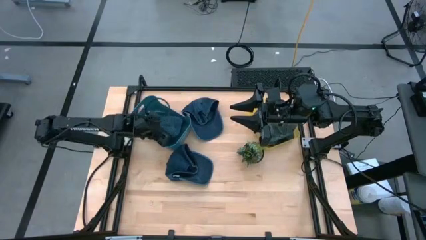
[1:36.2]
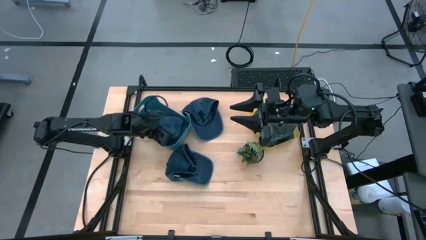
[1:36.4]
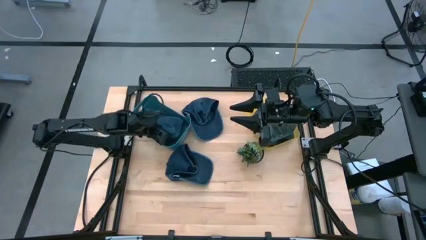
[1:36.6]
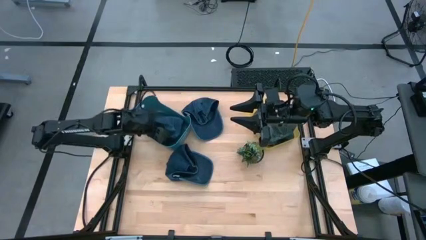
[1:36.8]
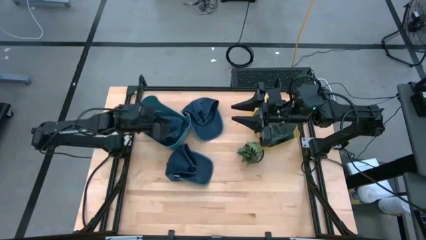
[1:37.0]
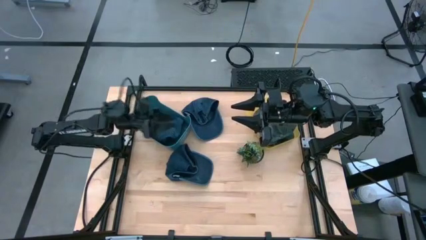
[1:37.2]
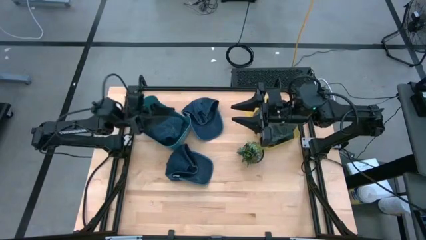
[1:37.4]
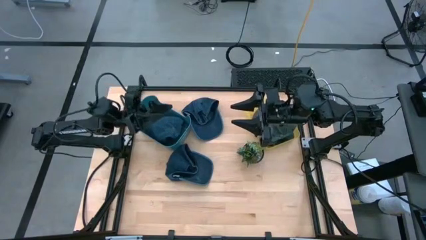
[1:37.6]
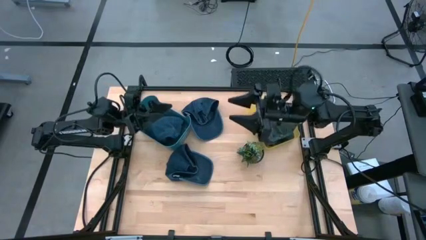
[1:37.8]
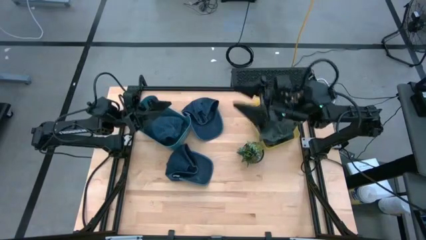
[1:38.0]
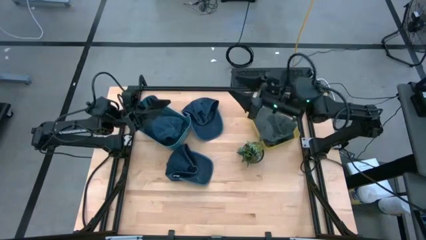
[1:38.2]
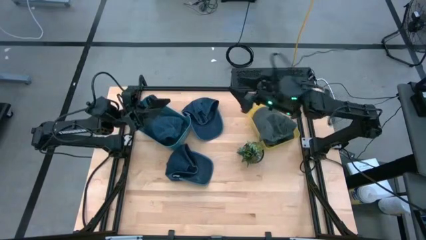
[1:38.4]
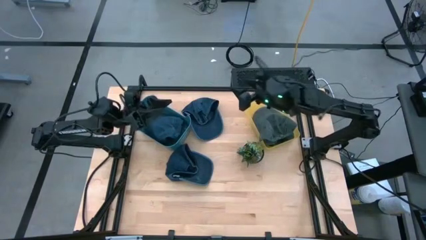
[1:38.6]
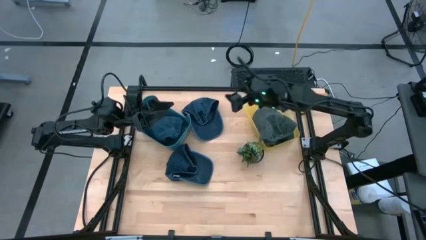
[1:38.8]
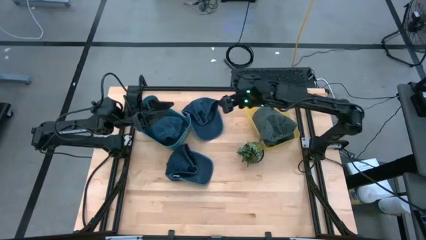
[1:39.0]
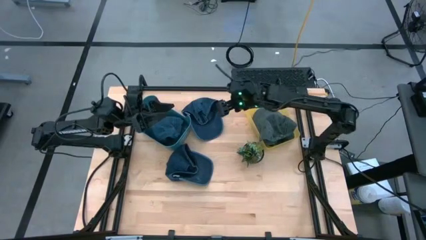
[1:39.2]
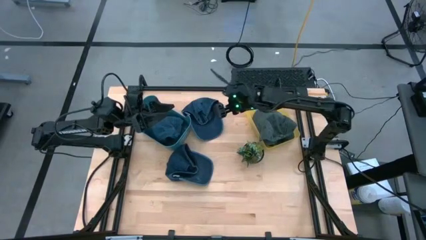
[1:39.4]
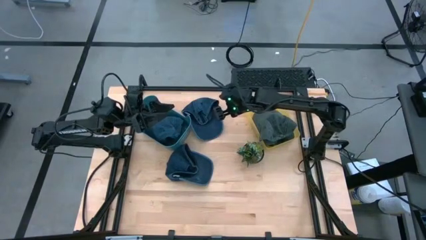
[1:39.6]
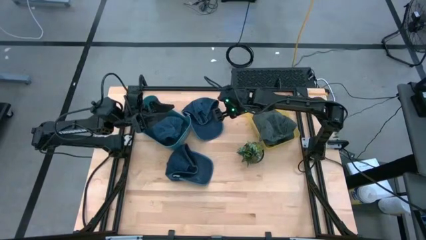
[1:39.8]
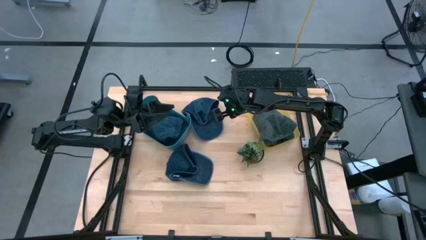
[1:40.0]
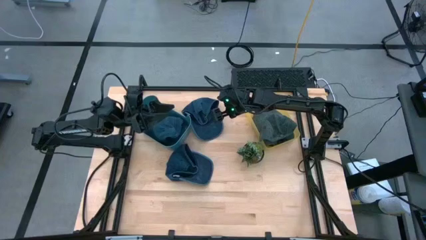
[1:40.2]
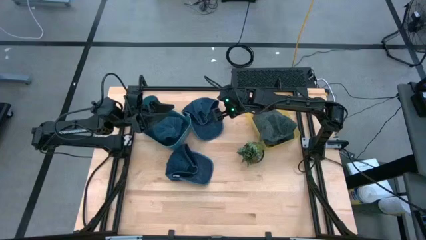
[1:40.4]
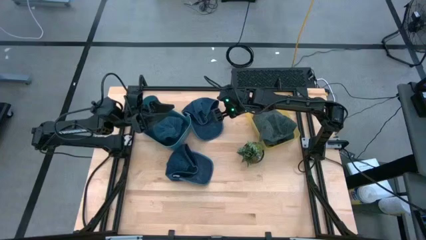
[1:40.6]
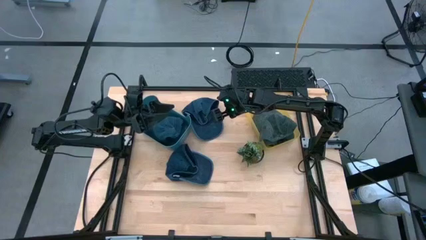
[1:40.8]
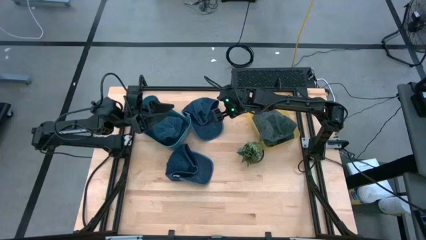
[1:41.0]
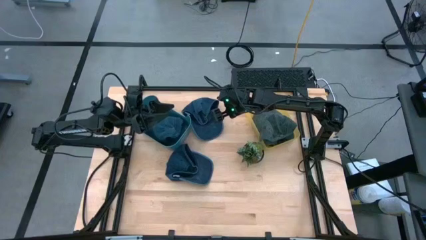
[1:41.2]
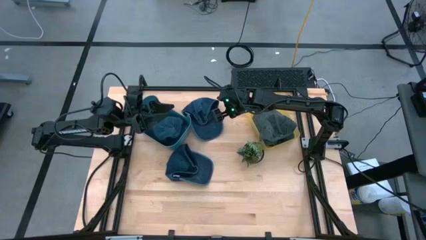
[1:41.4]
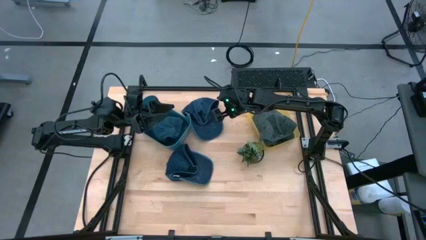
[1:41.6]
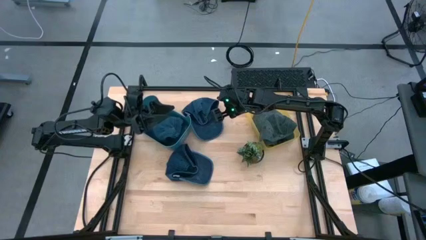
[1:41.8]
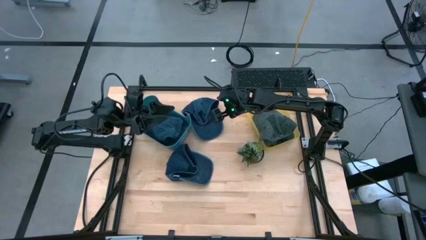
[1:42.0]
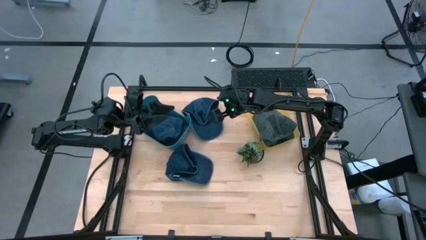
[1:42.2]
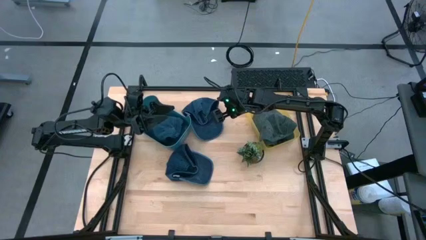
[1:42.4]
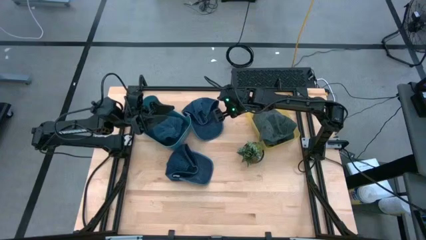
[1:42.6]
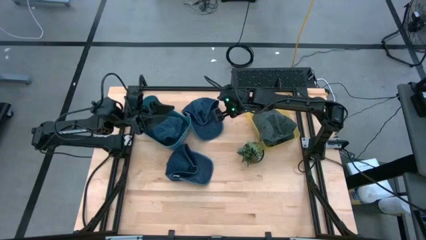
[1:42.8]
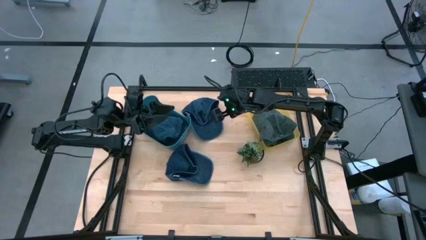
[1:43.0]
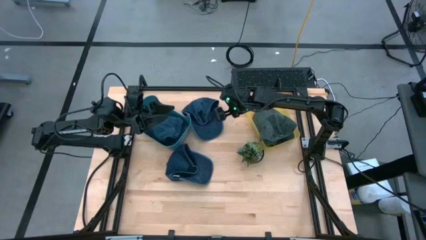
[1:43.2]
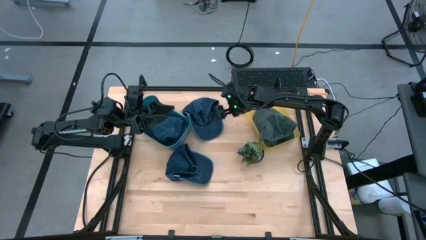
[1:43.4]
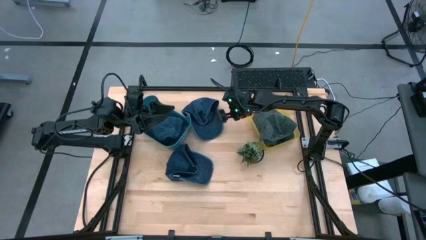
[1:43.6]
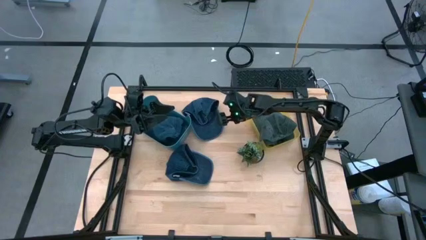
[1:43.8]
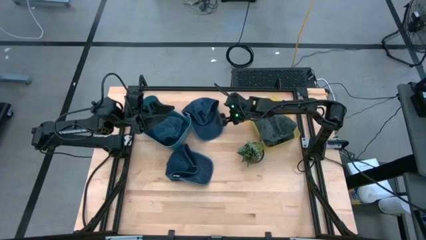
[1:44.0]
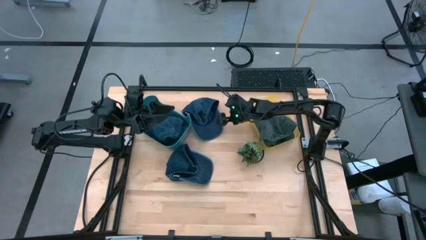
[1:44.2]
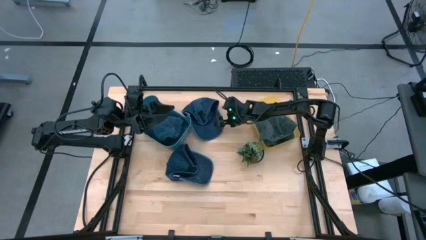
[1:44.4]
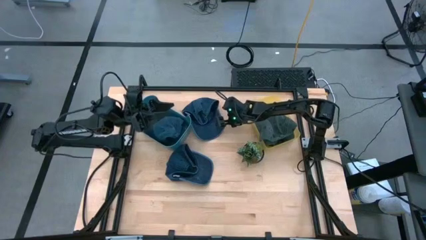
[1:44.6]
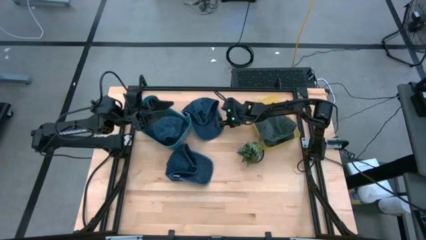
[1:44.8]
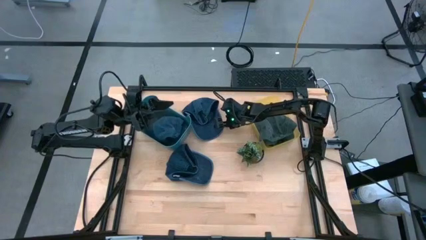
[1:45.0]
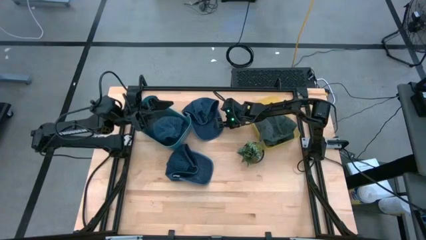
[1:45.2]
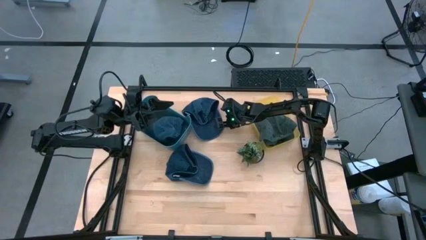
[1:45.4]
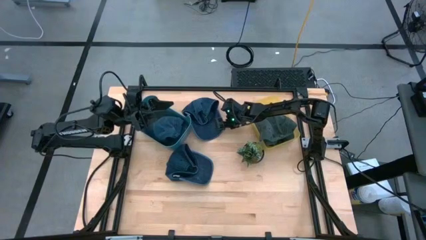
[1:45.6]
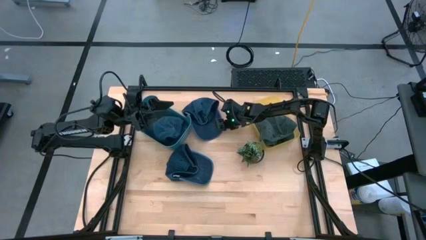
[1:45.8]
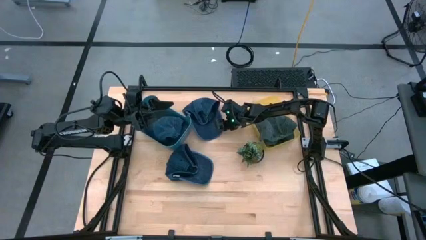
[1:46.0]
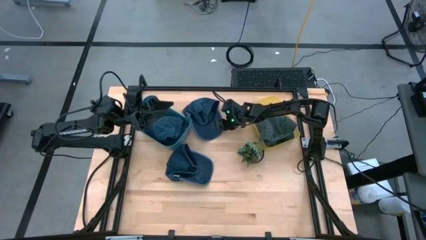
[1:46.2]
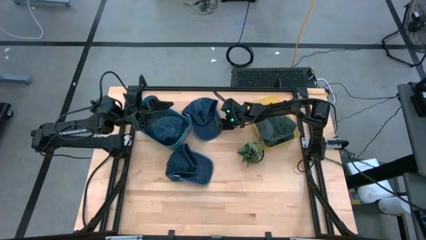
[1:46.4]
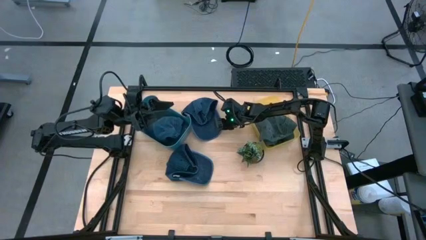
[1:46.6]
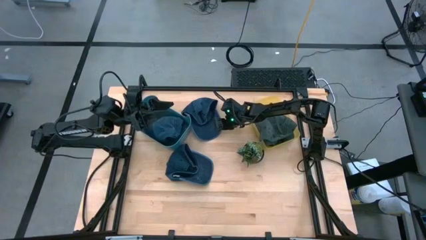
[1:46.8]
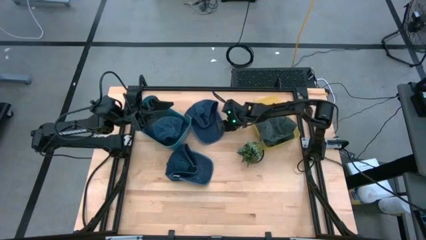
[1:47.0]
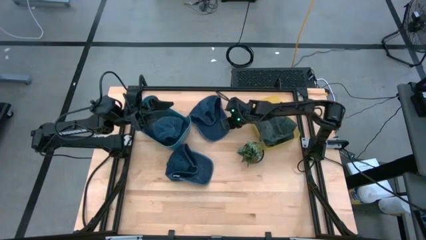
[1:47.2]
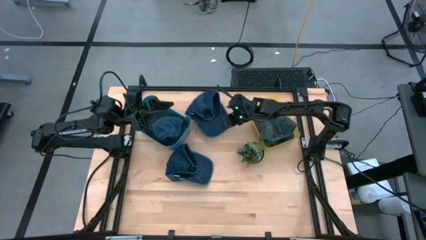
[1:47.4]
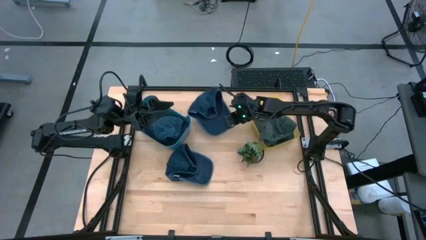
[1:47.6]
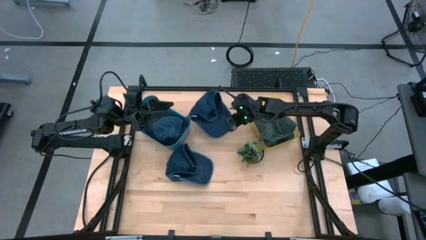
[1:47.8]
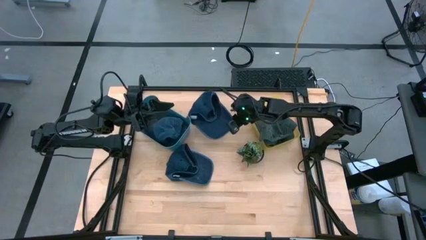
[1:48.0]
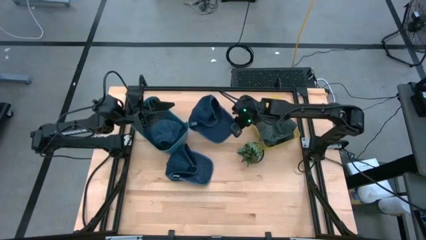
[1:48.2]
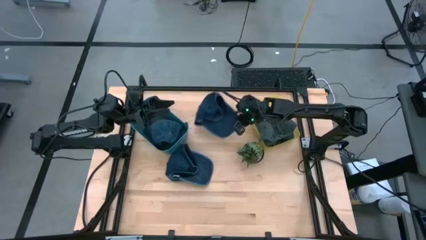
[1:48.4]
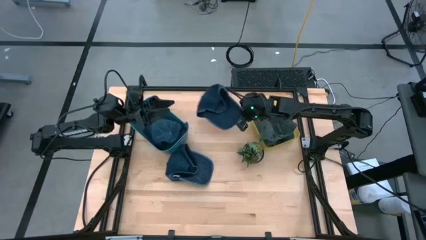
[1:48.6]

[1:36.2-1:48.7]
Task: Pick & Place hat
Put the top blue cap into the blue bin
